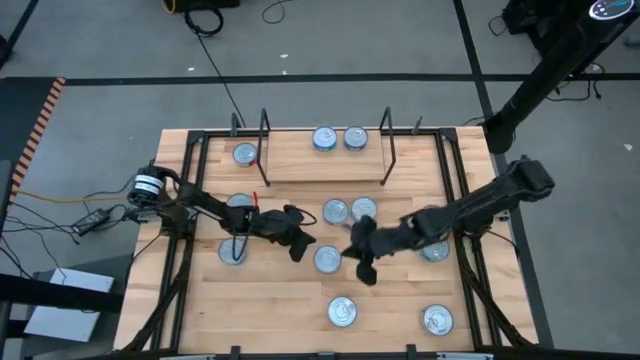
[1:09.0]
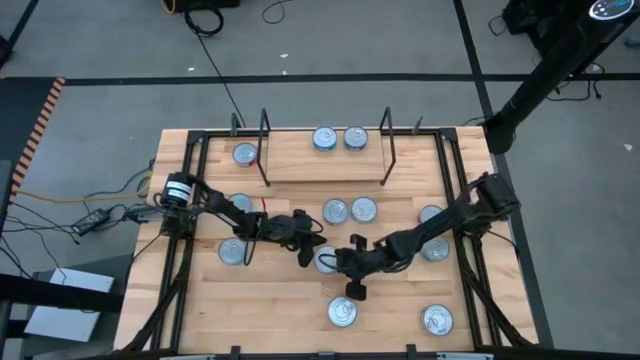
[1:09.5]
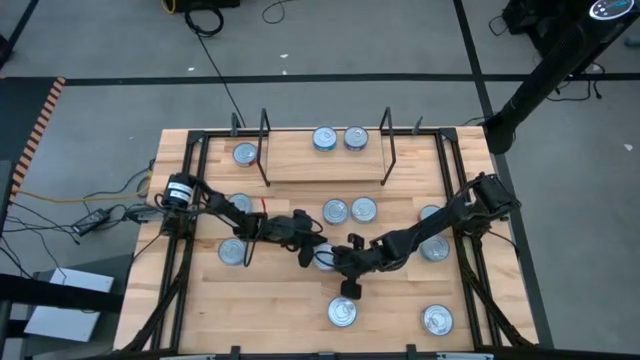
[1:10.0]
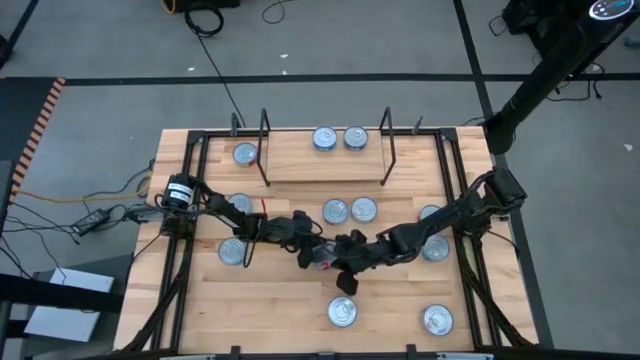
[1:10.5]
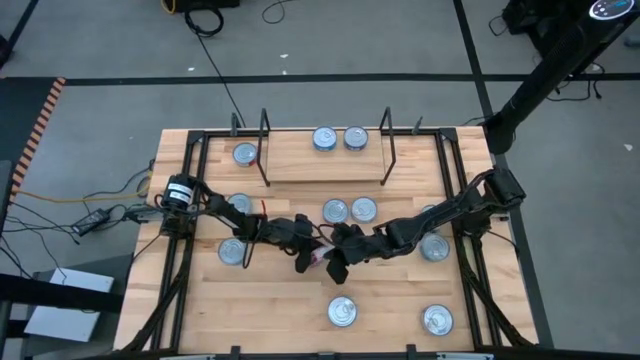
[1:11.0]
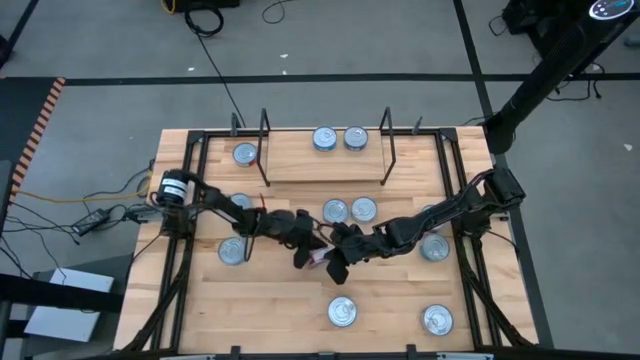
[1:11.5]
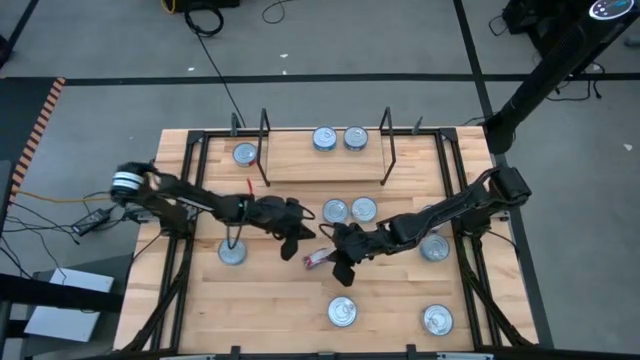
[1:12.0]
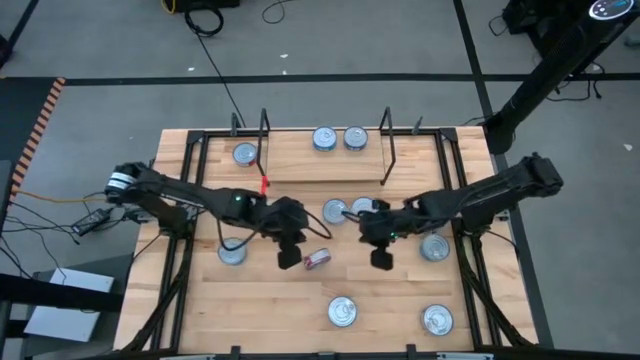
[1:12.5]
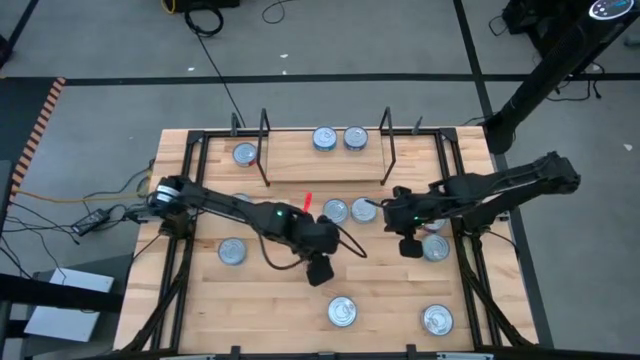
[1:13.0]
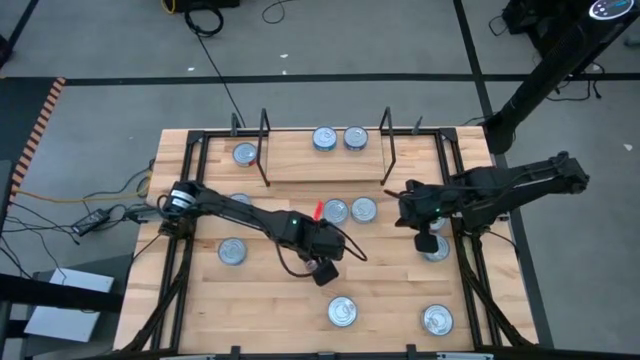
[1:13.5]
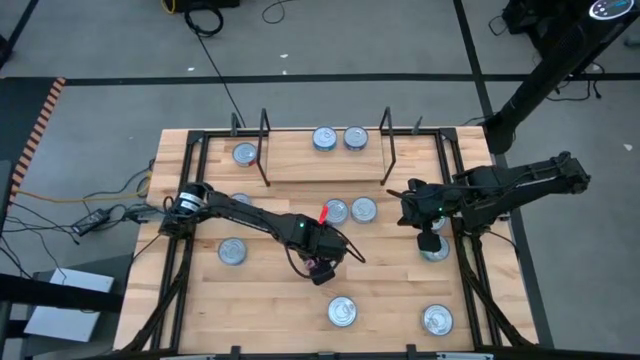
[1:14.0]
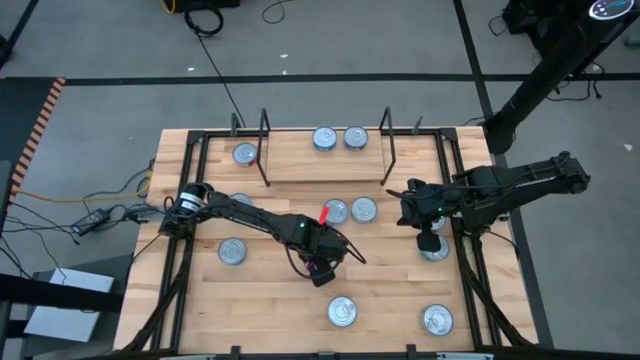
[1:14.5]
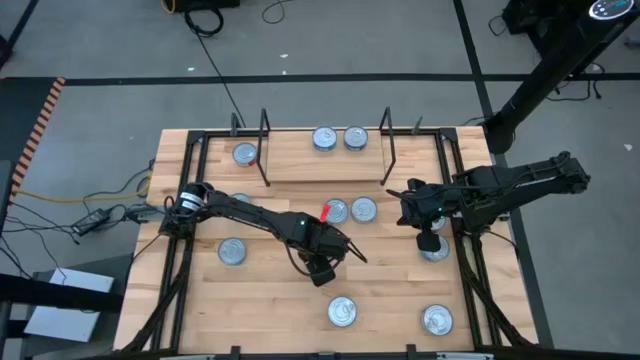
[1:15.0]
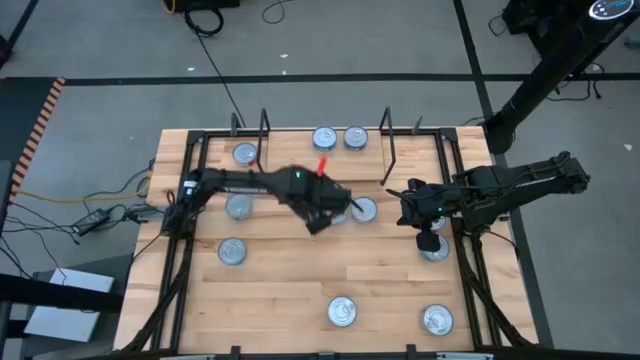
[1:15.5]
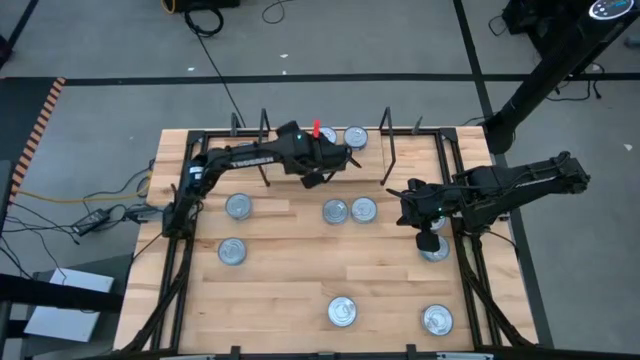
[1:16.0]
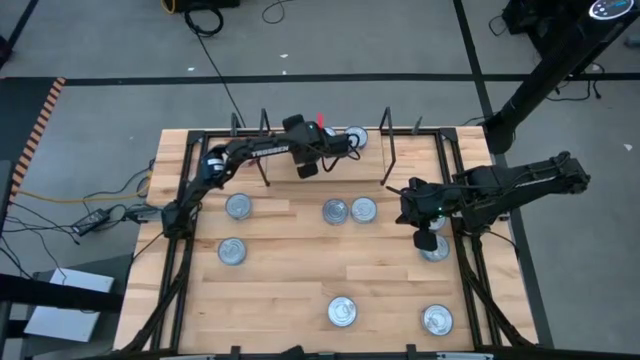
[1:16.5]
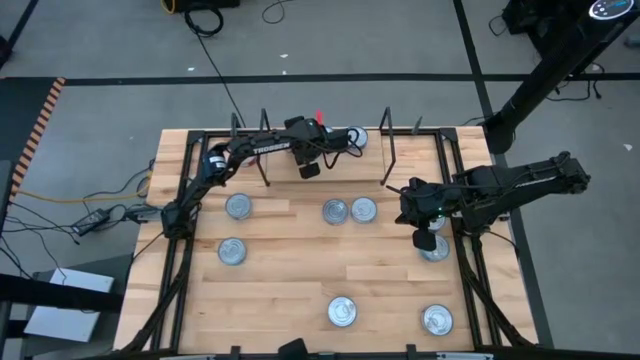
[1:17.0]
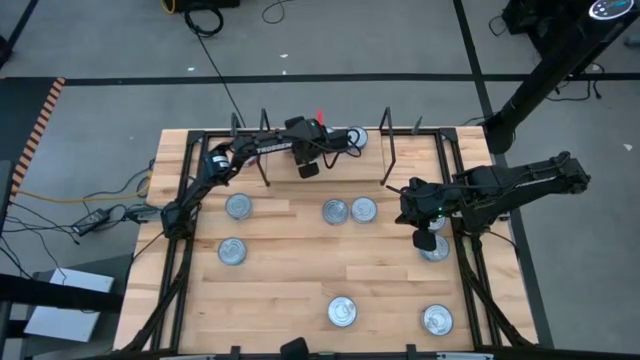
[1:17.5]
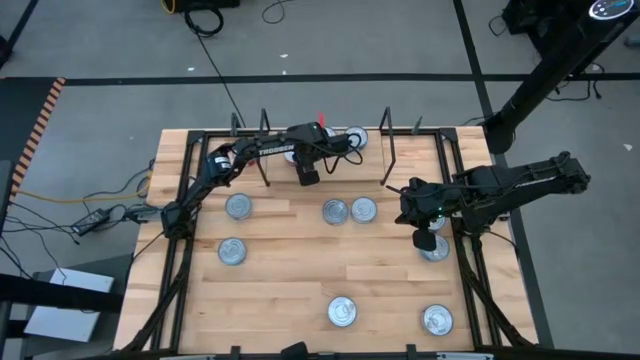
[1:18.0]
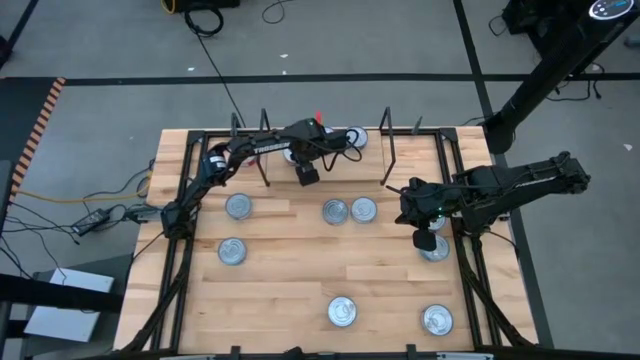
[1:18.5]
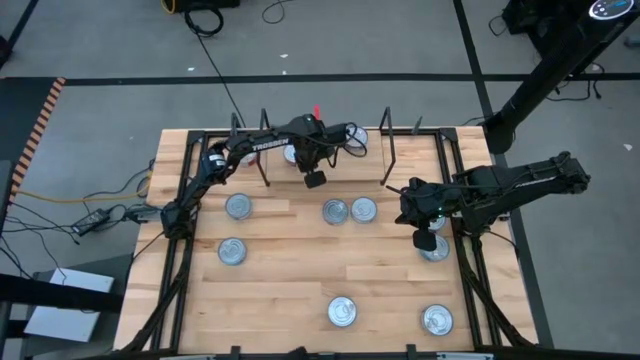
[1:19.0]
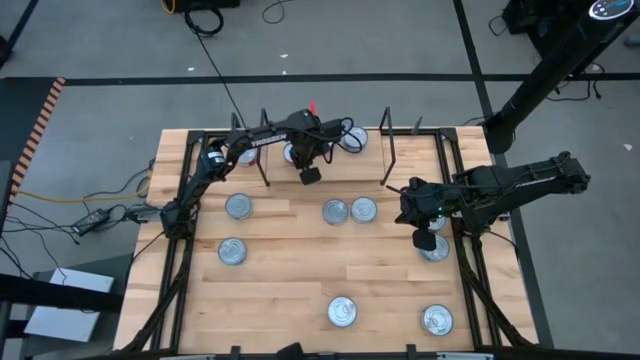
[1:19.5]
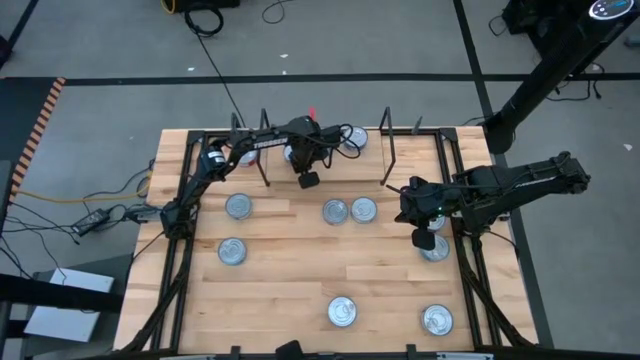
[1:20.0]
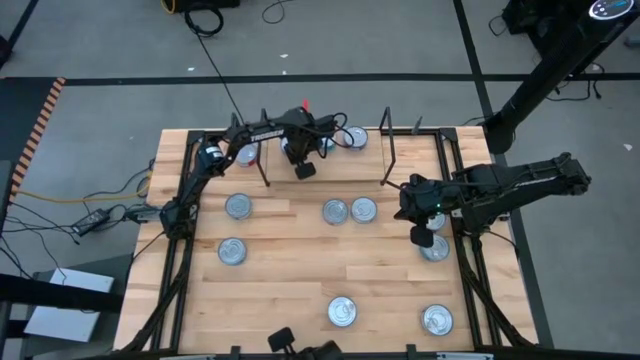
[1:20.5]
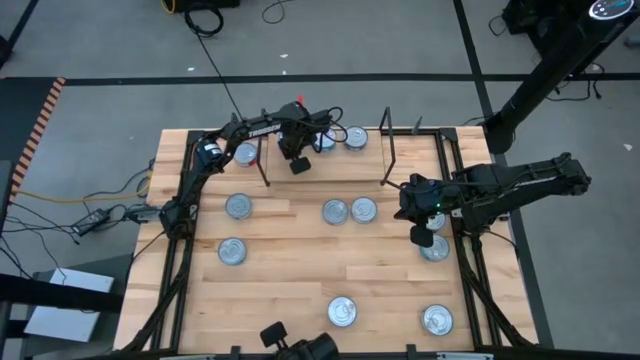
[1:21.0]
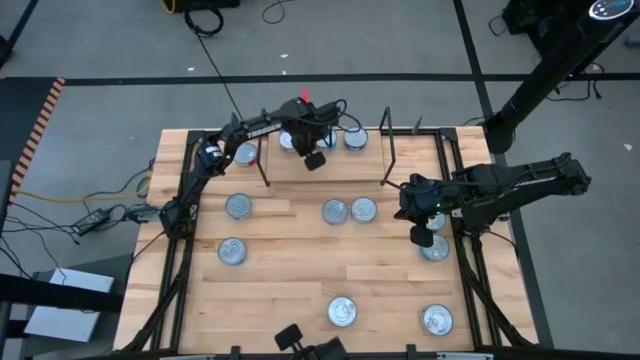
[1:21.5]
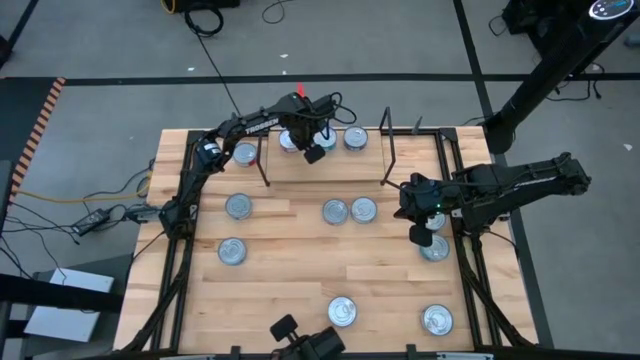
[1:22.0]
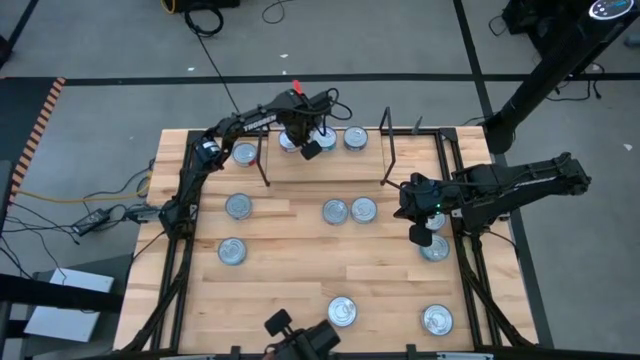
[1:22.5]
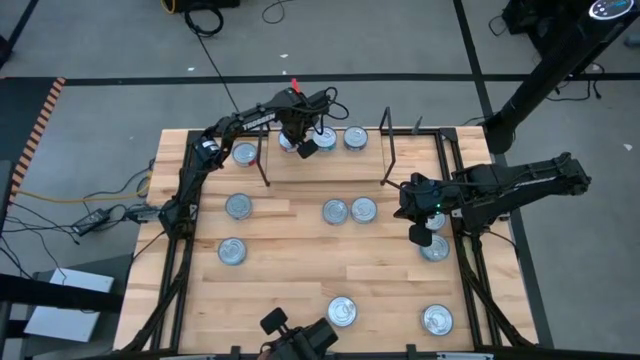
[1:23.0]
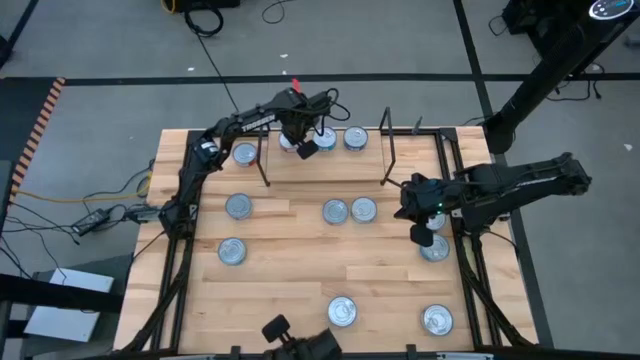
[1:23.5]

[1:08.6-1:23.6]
Task: Stack canned seafood by type on shelf
Put the red tuna can on the shelf

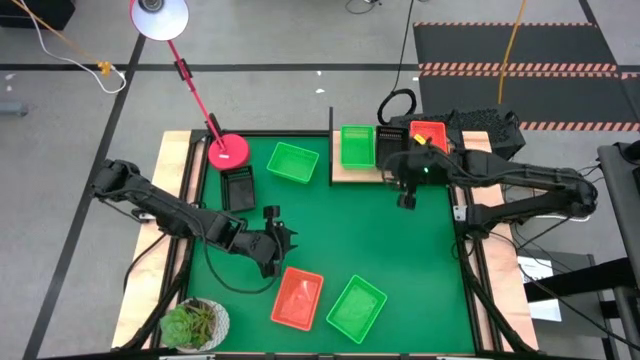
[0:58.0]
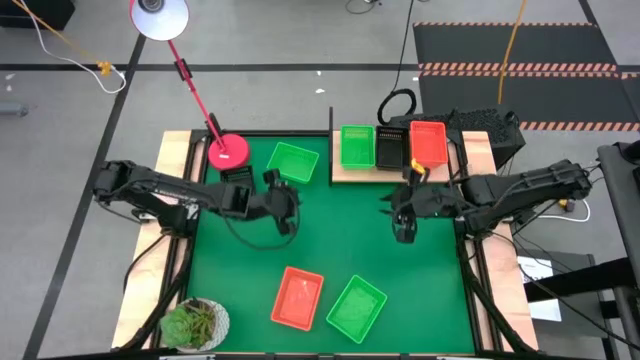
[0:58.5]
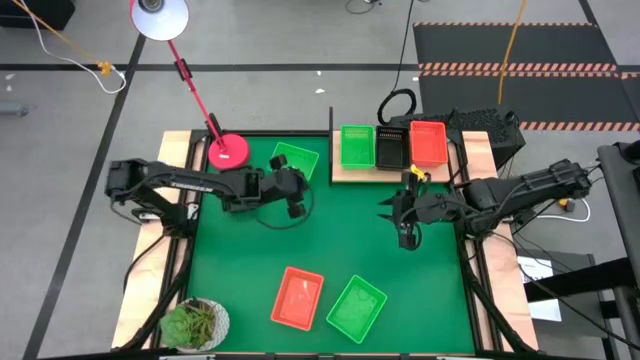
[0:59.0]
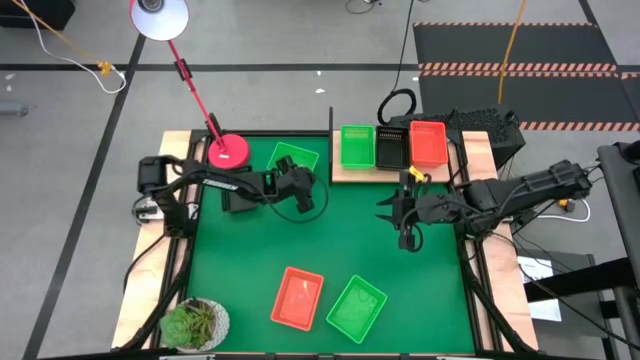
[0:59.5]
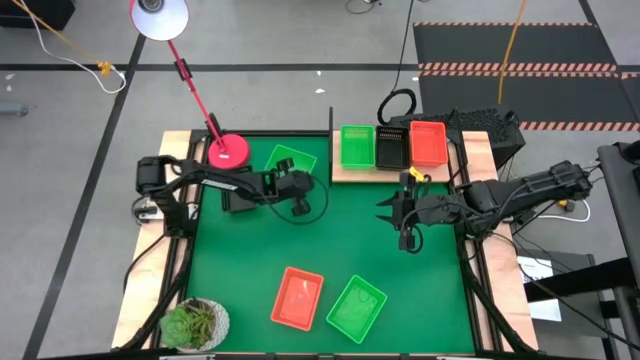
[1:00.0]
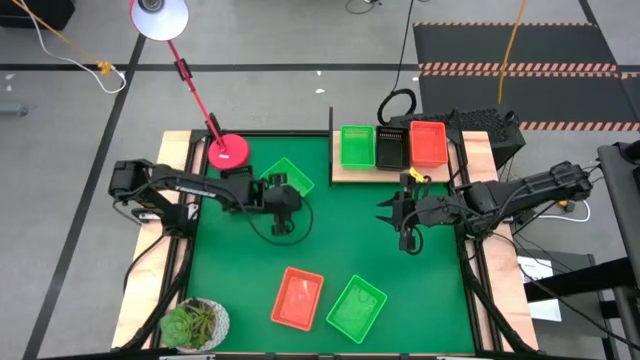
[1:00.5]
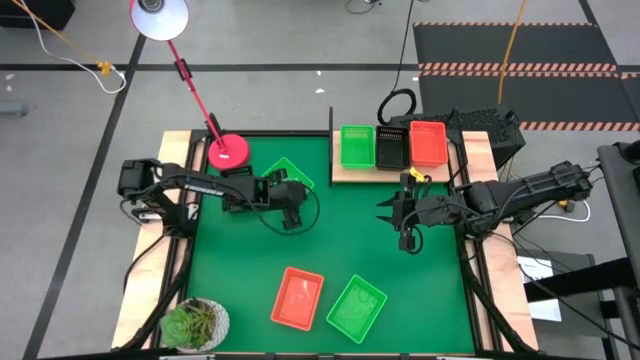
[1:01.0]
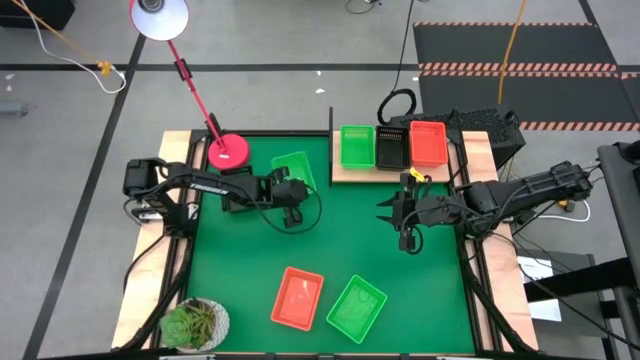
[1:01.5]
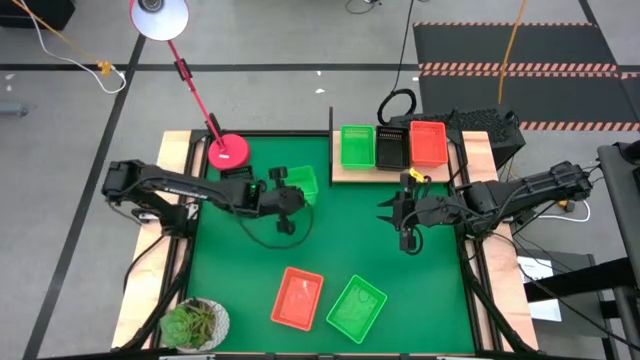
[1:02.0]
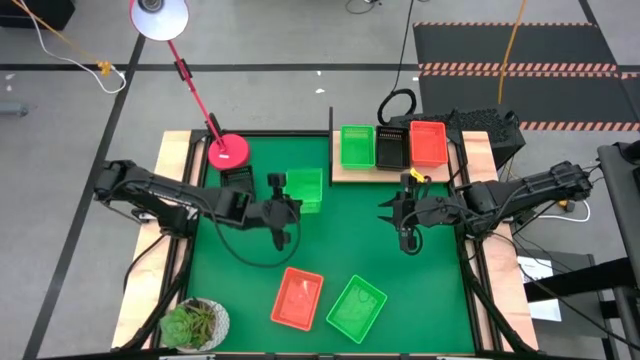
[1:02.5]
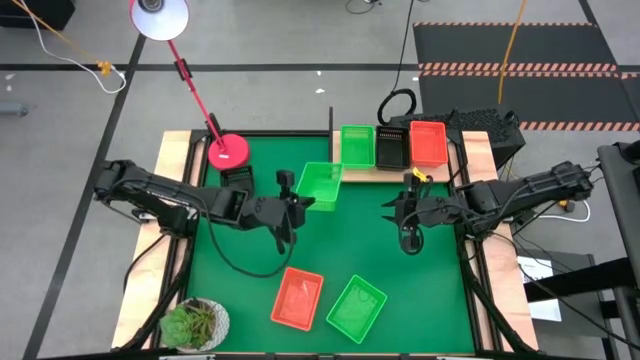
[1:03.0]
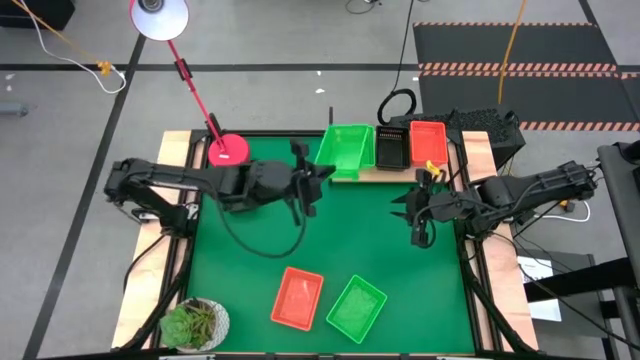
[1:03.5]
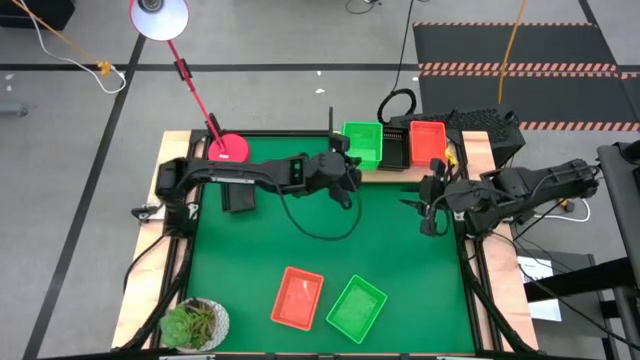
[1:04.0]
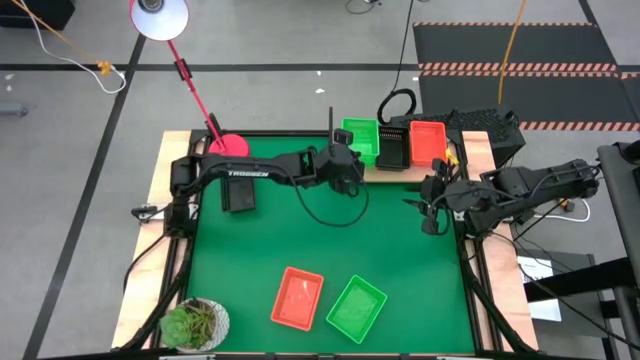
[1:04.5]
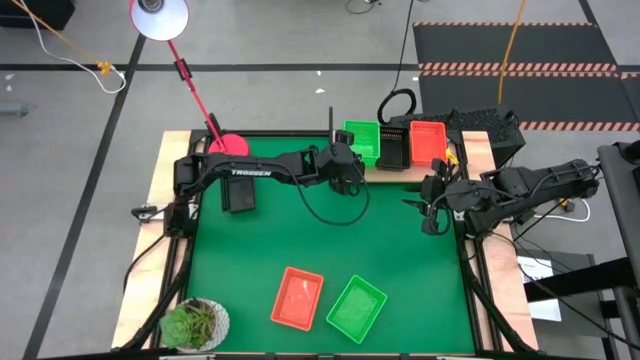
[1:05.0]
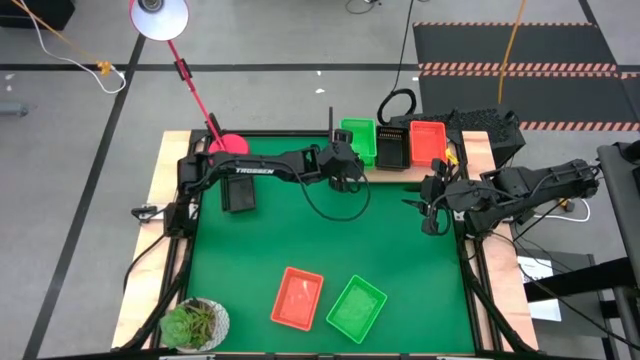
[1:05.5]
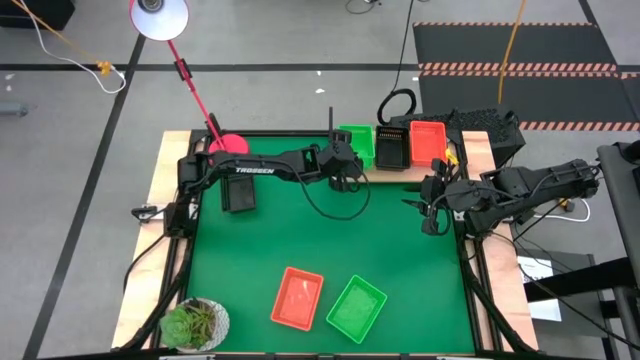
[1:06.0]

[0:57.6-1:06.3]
Task: Stack baskets on shelf by color
Stack the top green bin on top of the green bin on the shelf
